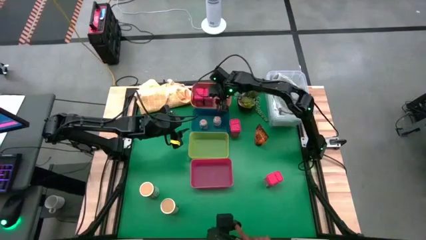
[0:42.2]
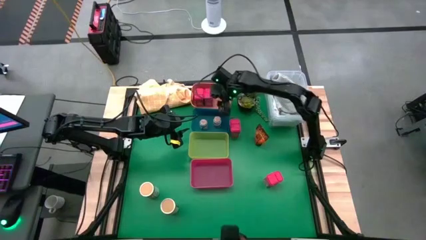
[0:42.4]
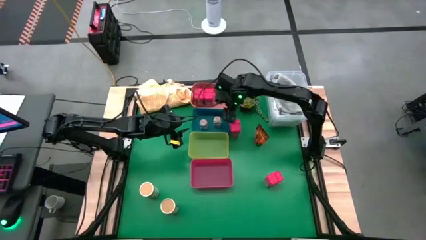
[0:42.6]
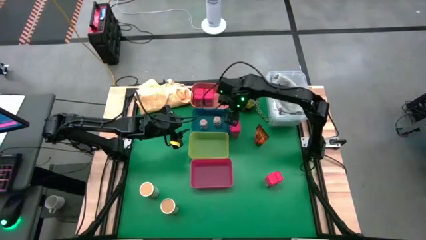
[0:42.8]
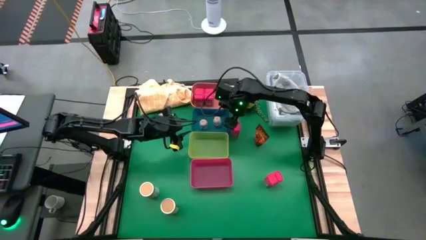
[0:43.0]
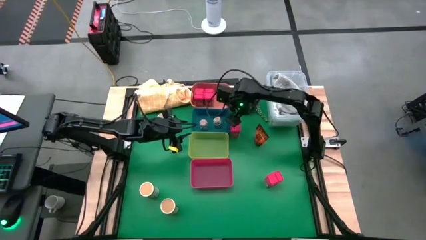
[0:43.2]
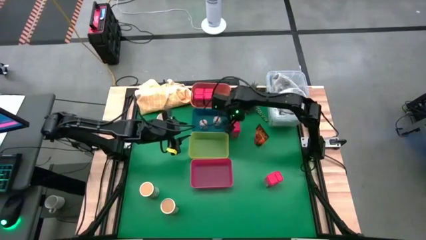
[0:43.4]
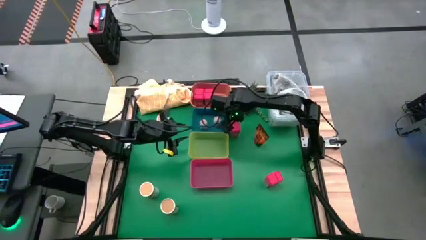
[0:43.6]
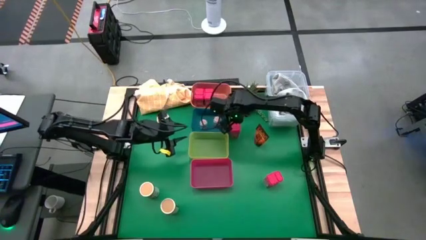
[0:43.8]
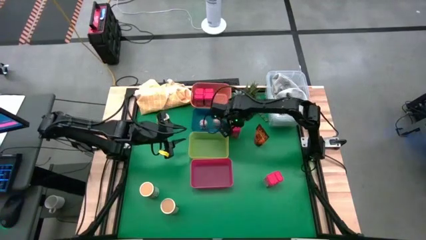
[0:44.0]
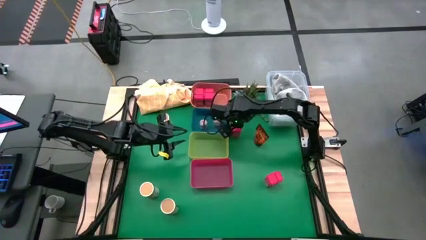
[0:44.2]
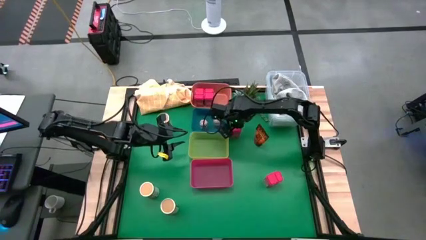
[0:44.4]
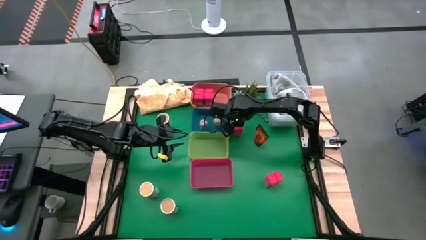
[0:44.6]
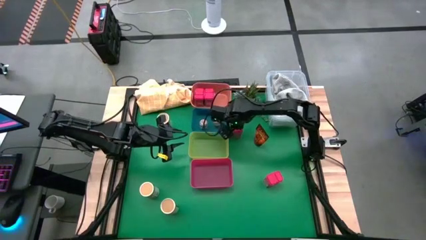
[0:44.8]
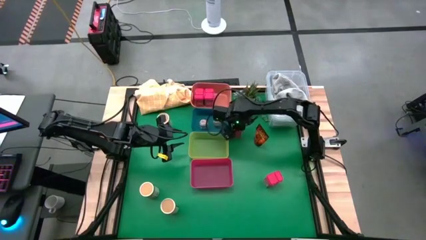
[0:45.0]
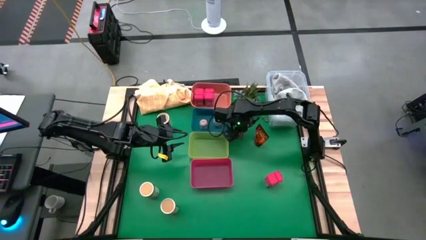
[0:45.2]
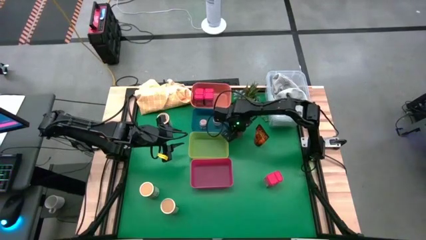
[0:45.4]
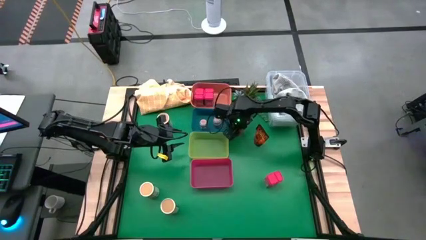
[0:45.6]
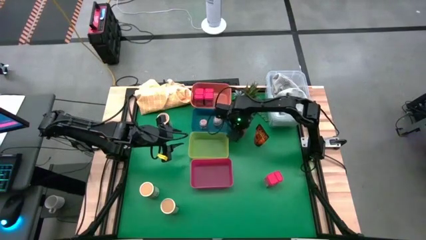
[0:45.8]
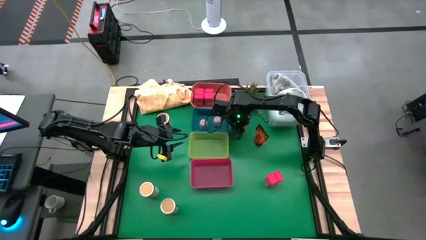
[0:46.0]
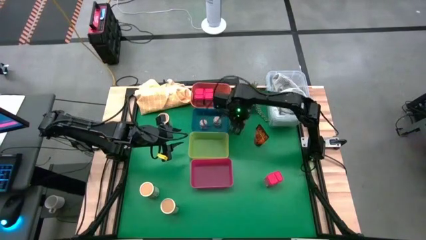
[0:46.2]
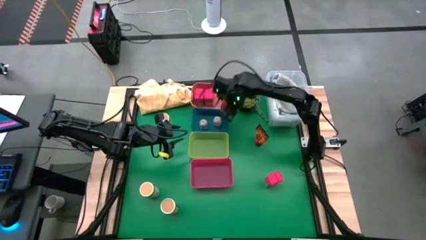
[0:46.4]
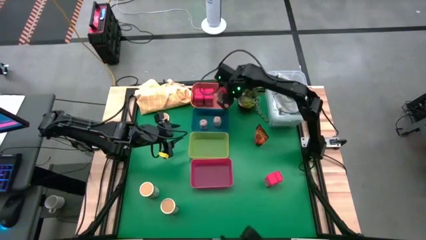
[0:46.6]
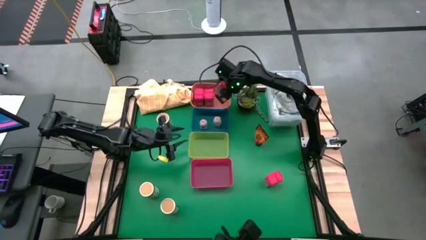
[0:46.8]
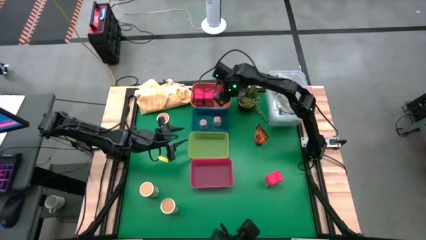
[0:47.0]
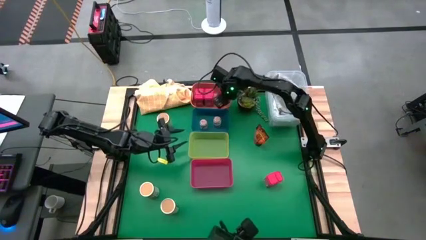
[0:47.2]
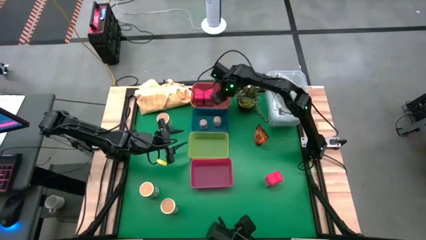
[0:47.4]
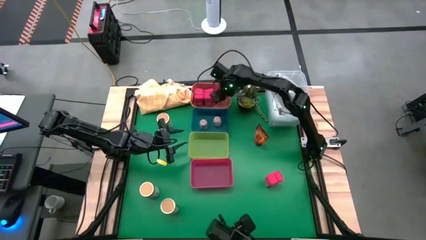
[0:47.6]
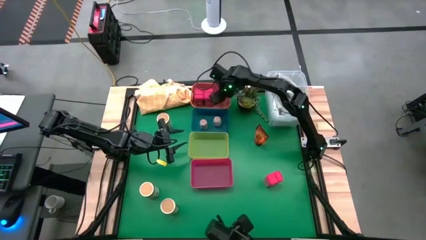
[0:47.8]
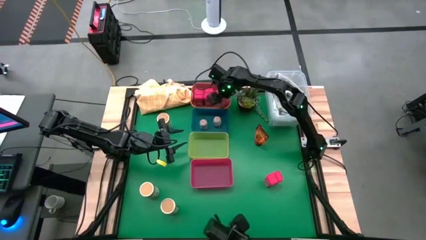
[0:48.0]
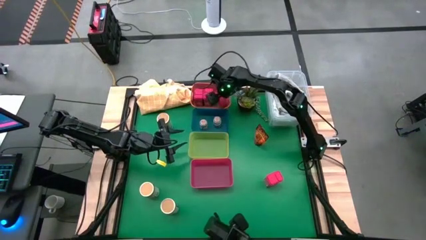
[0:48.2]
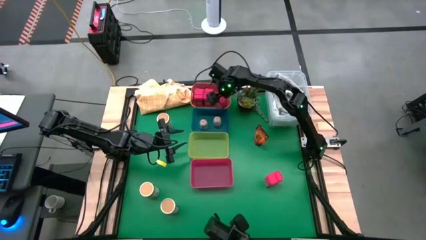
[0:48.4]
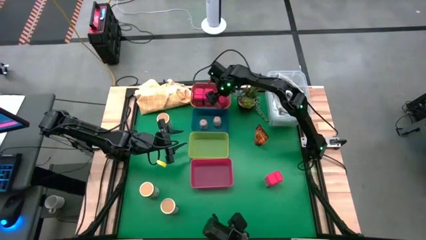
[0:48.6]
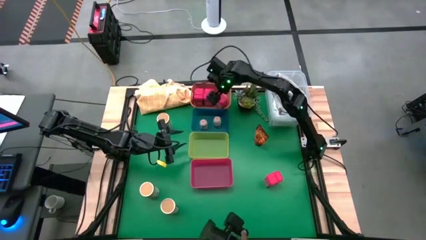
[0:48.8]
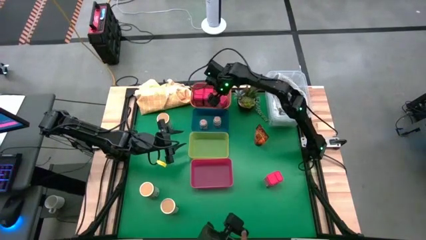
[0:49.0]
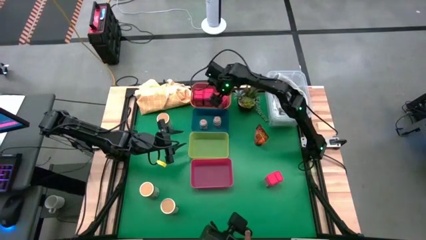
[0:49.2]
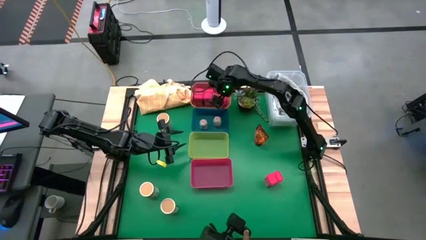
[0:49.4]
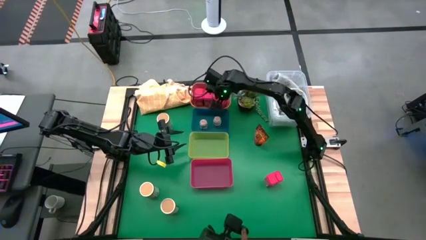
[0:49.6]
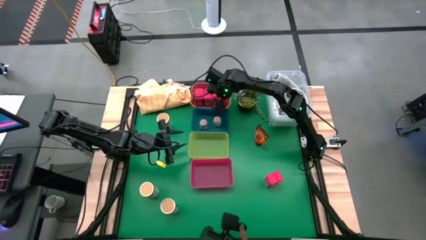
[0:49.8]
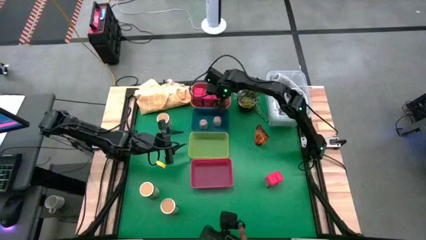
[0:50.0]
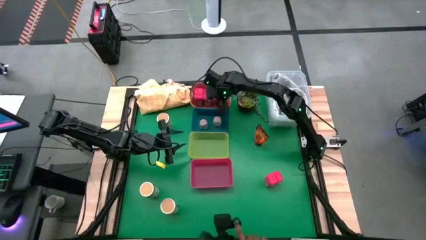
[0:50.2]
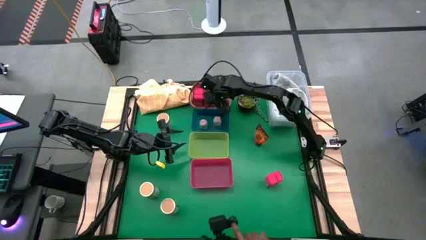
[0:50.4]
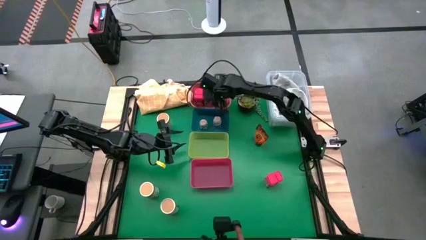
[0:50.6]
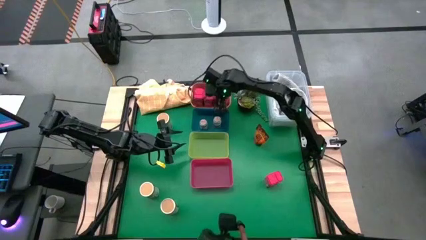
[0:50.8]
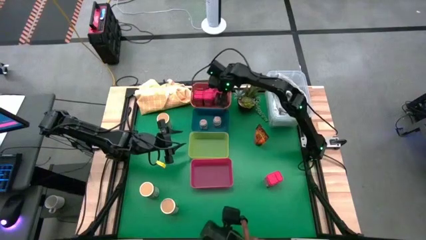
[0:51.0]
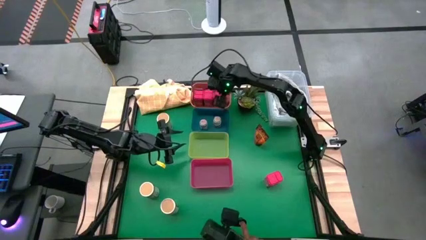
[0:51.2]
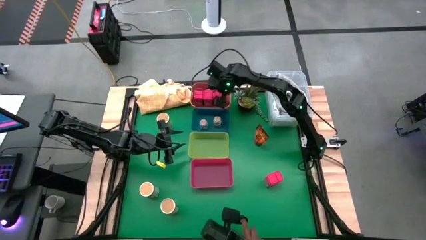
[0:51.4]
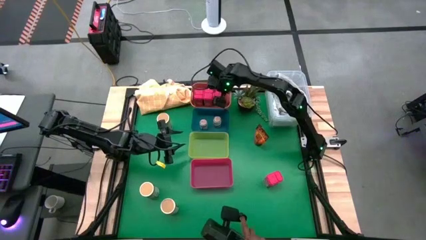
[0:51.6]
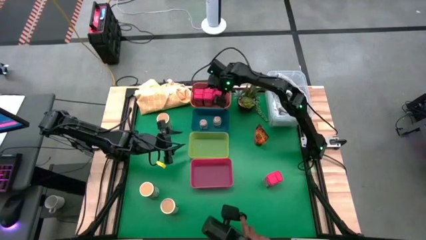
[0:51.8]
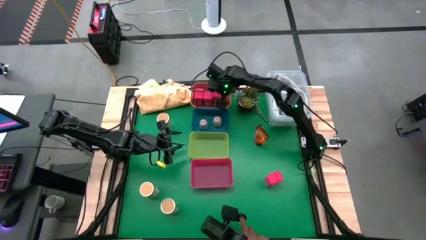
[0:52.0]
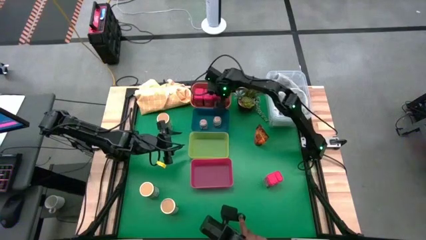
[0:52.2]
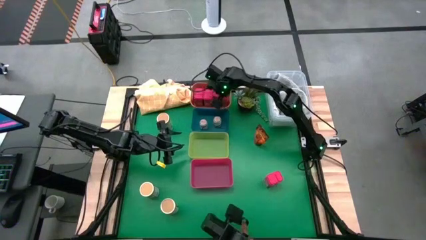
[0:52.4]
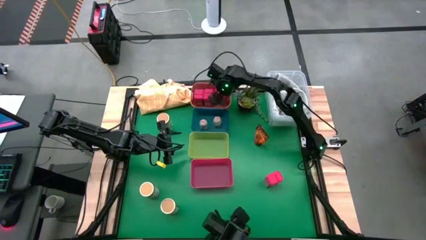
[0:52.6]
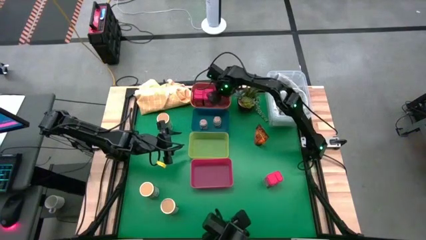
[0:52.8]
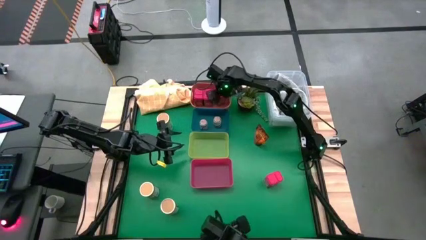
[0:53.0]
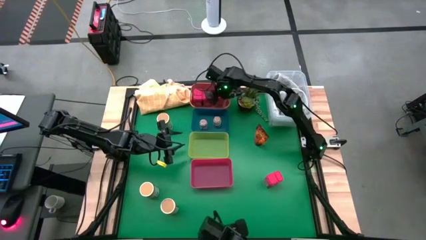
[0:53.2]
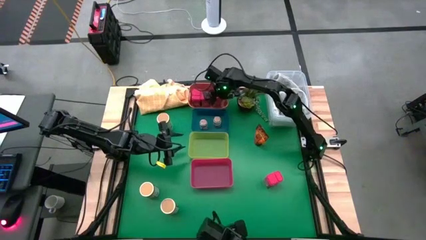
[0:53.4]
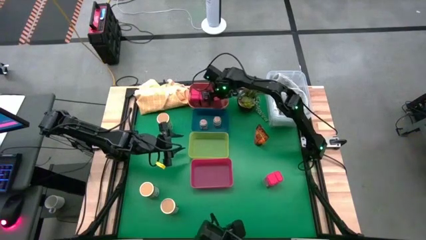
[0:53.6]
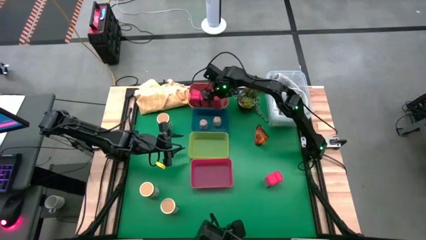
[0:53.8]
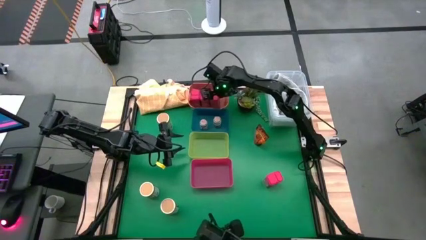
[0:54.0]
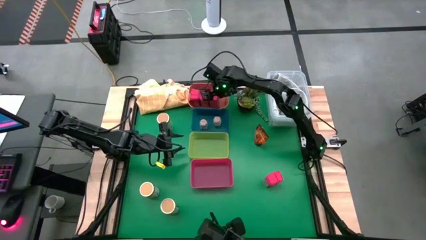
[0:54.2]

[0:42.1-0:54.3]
Task: Sort spices by type
Put the red seasoning can into the orange bin
